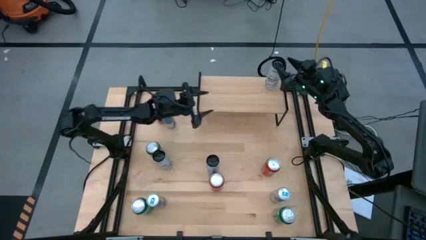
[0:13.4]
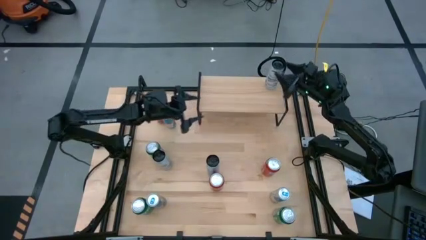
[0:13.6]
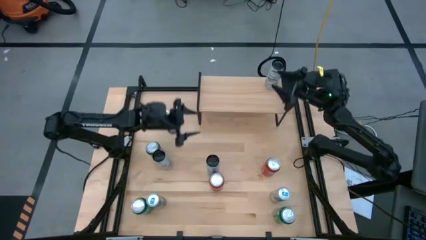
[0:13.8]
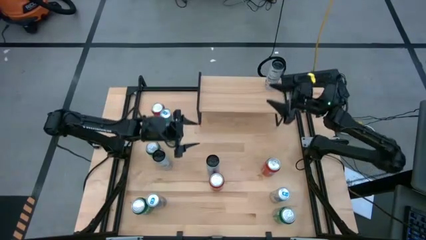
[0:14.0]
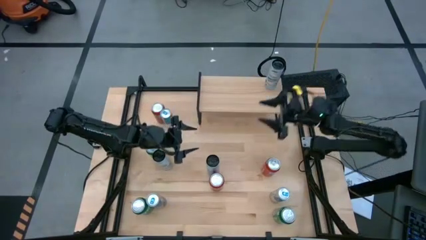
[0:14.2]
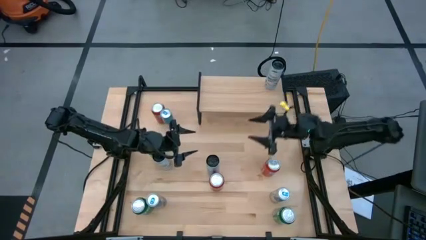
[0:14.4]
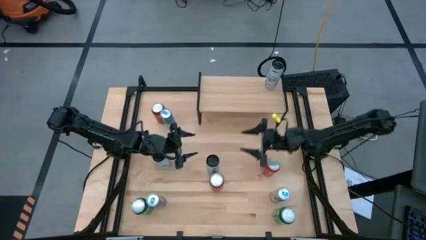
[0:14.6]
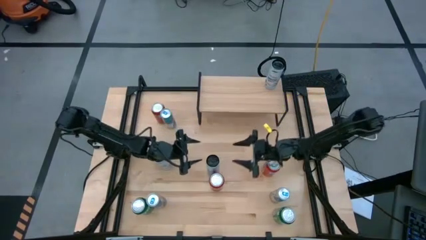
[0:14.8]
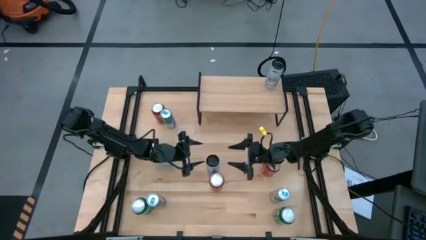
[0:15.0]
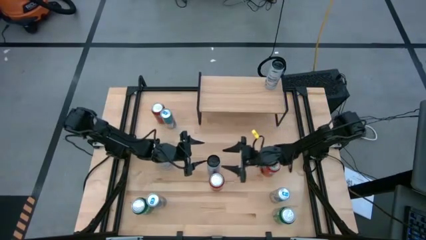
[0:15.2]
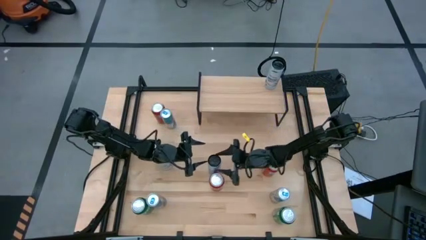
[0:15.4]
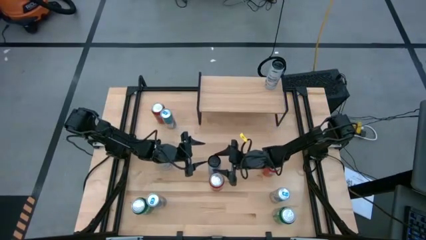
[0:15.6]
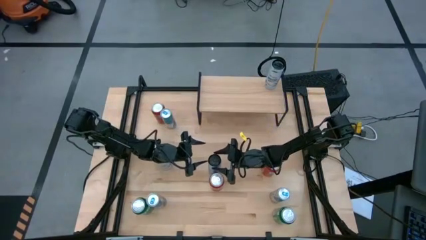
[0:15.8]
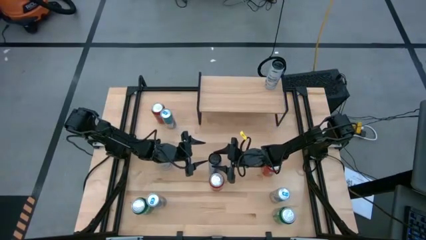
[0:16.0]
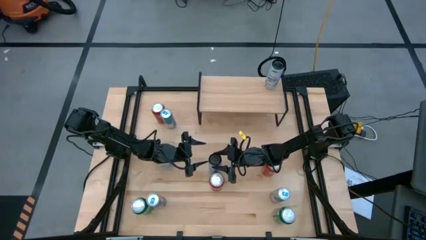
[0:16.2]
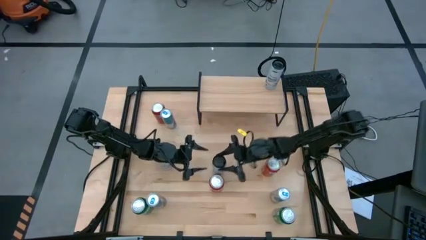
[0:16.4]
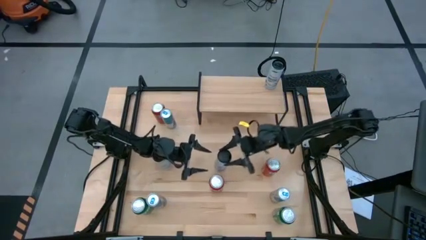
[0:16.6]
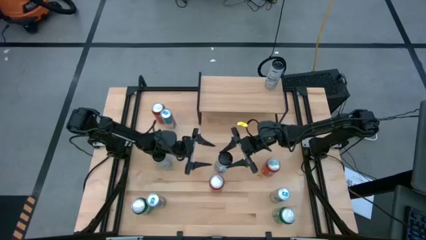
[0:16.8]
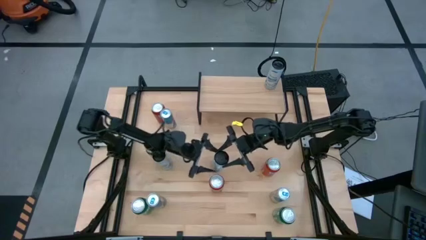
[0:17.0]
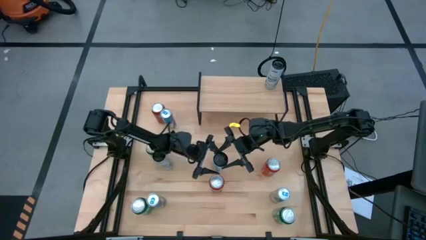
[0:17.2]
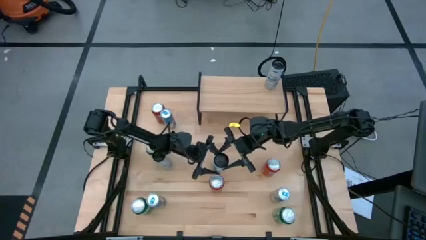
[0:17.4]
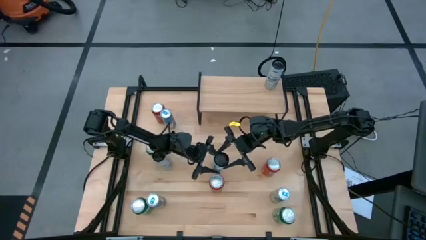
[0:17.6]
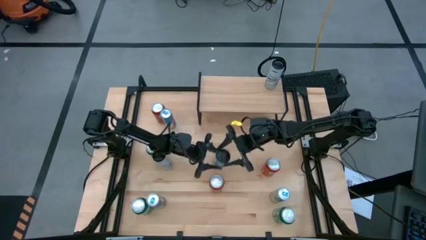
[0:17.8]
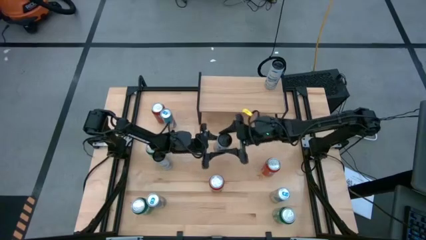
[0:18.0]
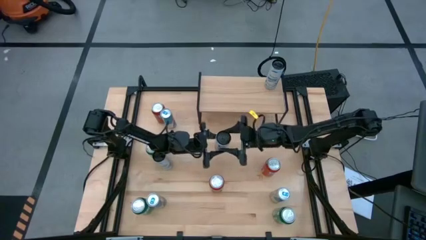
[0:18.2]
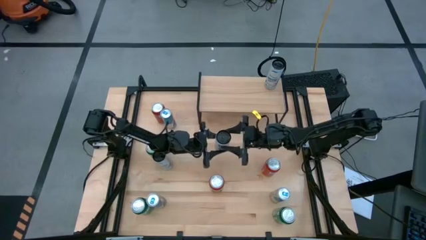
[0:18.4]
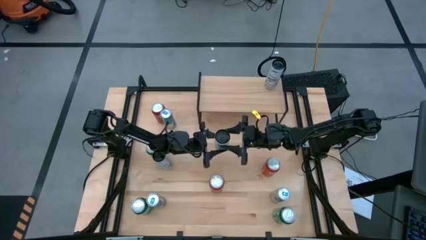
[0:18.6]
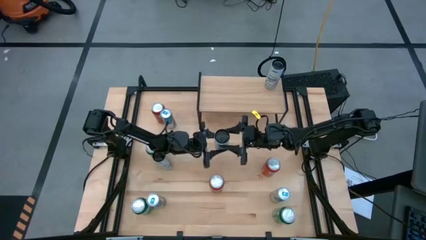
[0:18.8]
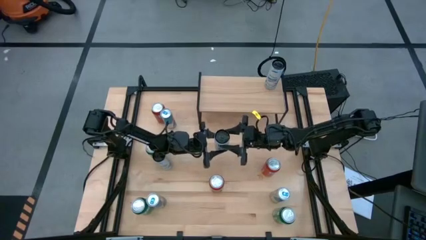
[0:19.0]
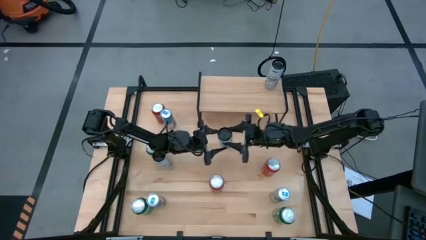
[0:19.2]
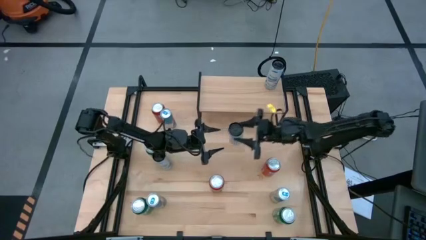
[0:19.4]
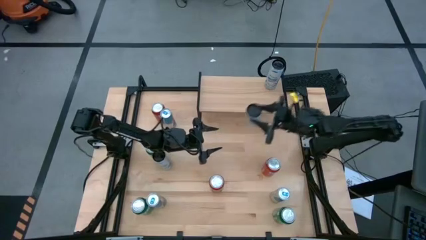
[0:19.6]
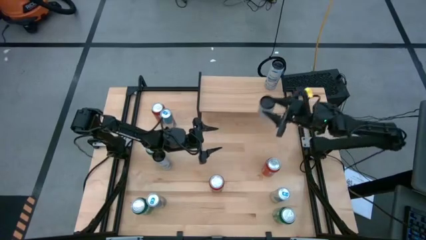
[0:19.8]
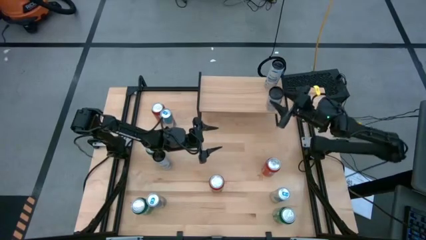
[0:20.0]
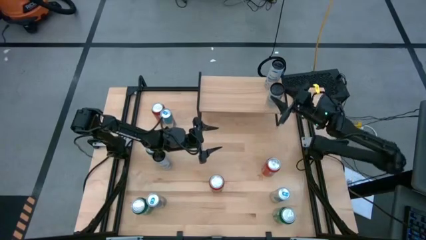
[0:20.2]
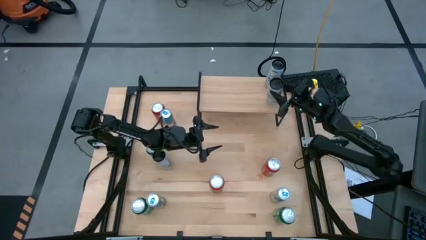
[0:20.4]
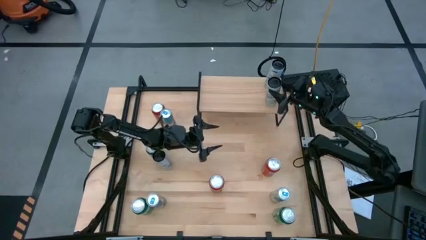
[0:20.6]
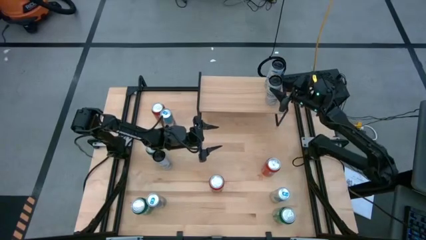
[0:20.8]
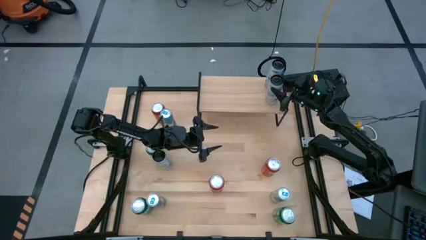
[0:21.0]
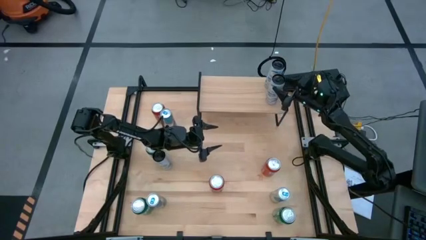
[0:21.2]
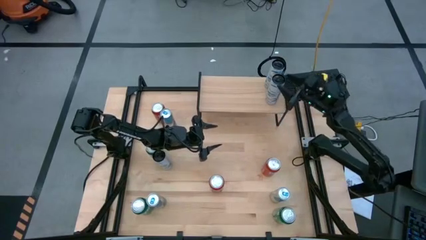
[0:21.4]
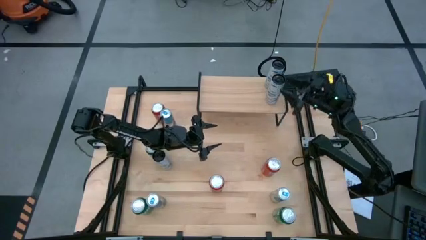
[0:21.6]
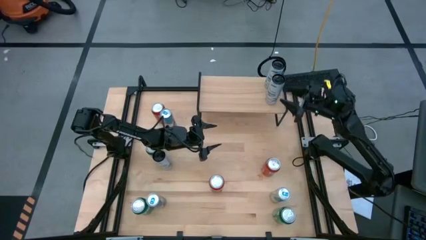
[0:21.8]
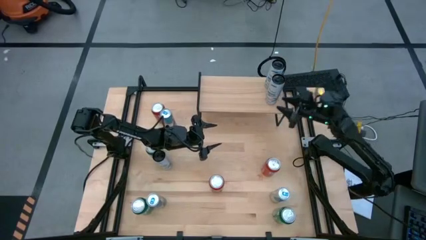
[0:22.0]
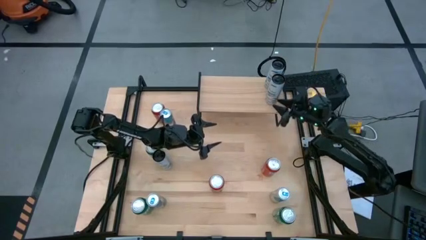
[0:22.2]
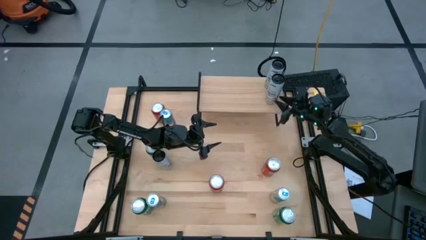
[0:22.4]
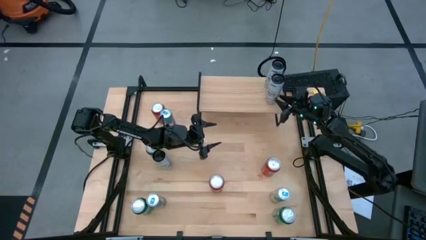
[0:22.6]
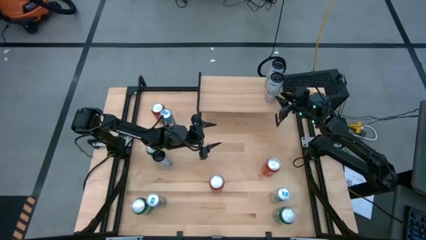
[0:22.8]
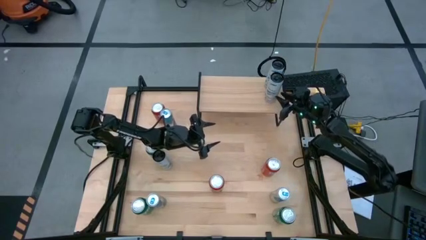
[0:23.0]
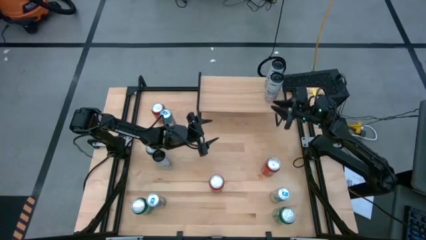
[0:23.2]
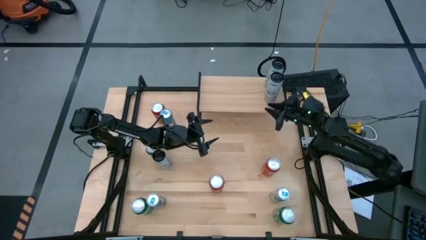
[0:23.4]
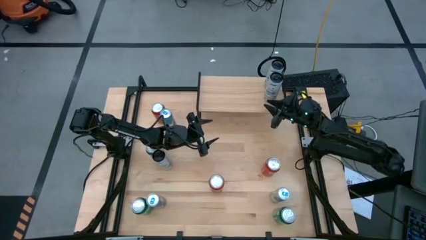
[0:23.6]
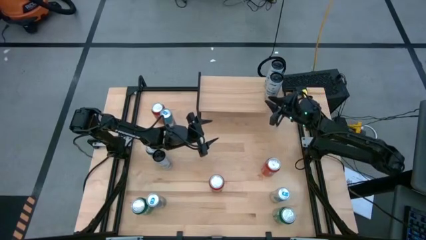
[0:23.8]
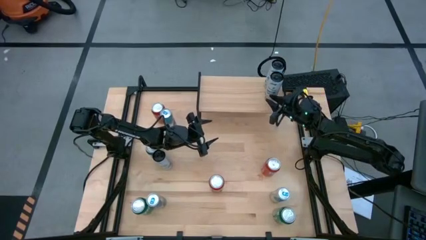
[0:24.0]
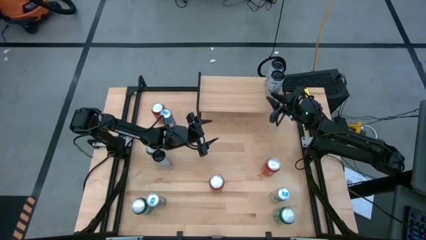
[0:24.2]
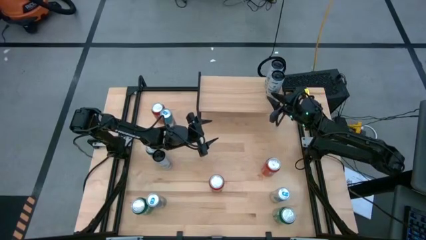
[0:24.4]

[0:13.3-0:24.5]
Task: Place canned beverage on shelf
Put the right white-blue soda can on the shelf aligned with the other white-blue soda can
